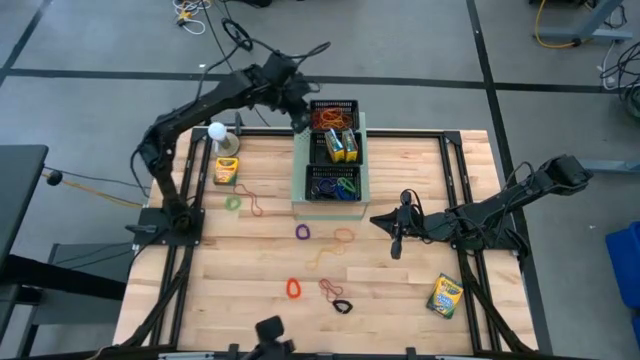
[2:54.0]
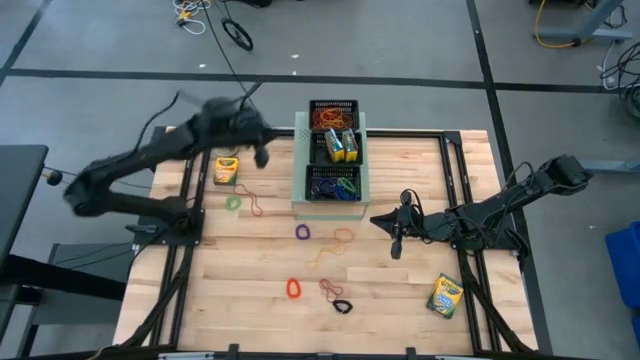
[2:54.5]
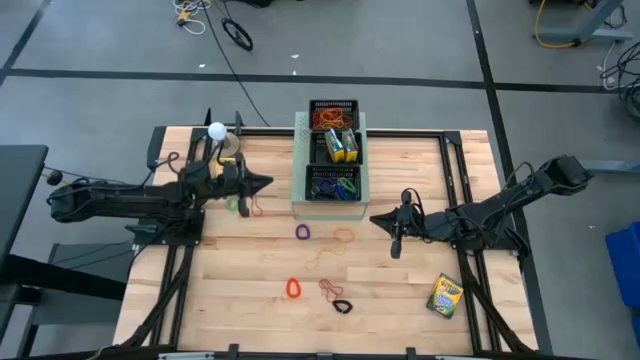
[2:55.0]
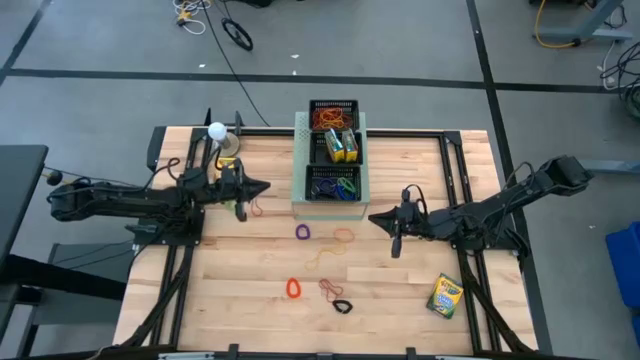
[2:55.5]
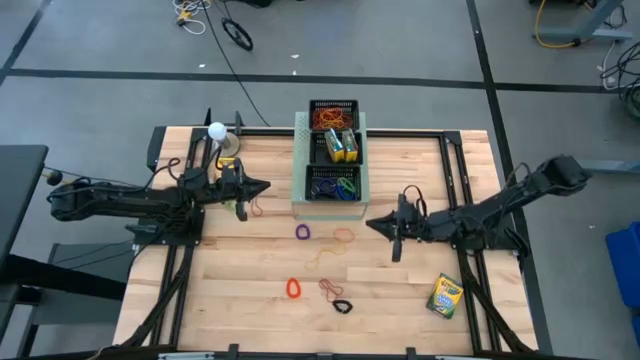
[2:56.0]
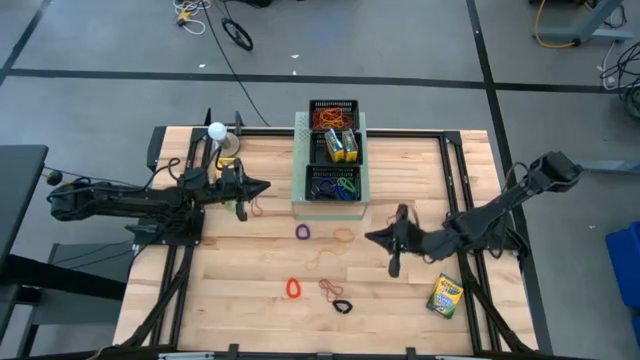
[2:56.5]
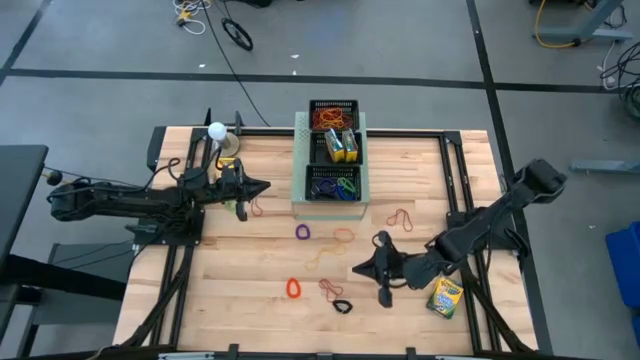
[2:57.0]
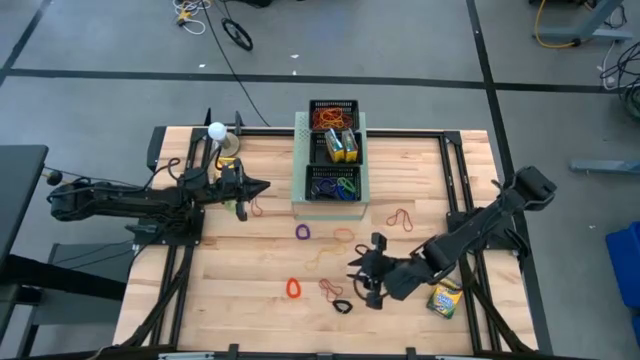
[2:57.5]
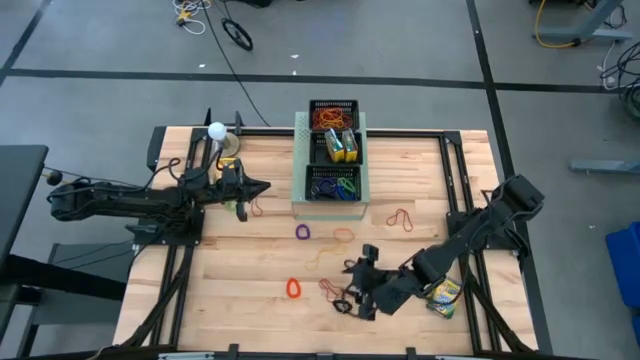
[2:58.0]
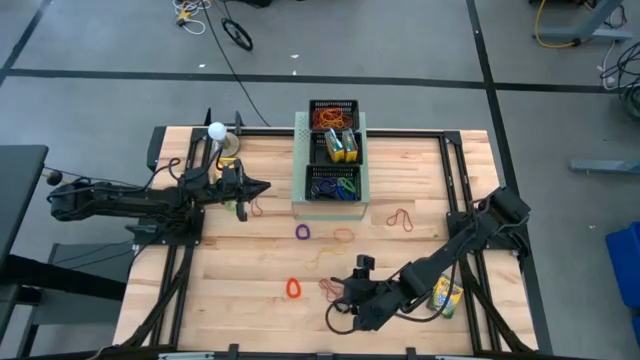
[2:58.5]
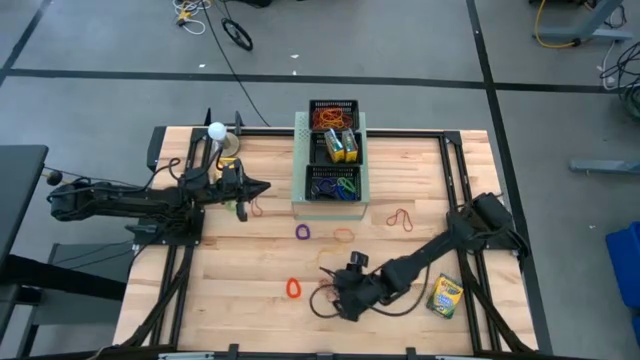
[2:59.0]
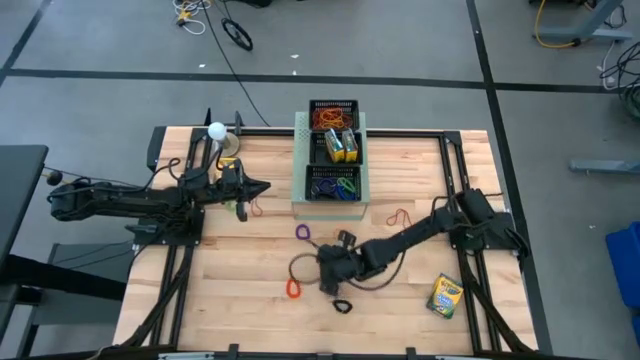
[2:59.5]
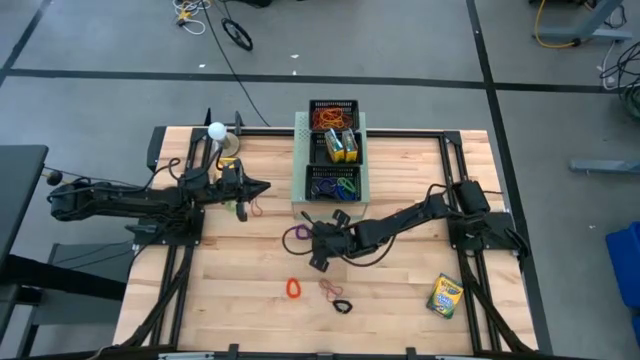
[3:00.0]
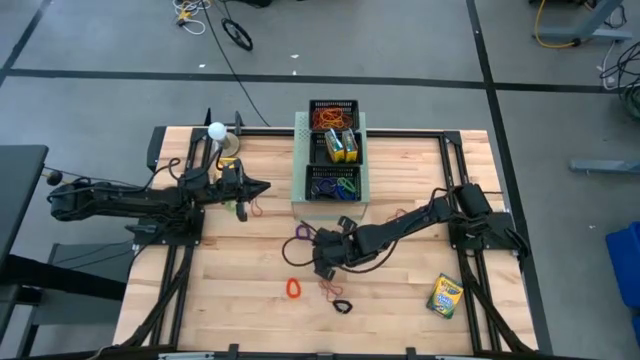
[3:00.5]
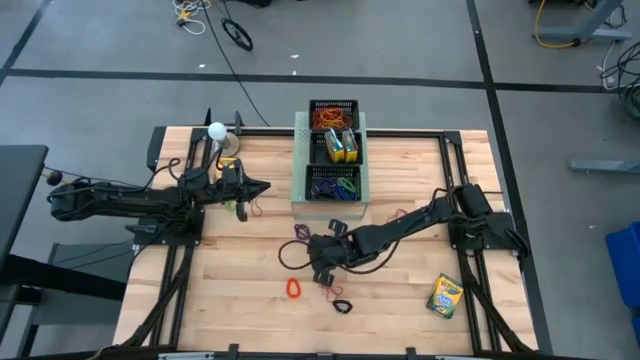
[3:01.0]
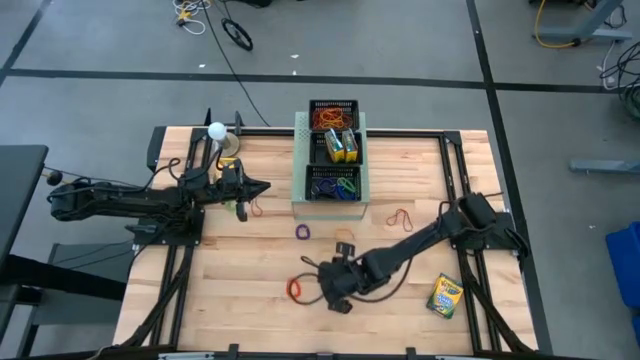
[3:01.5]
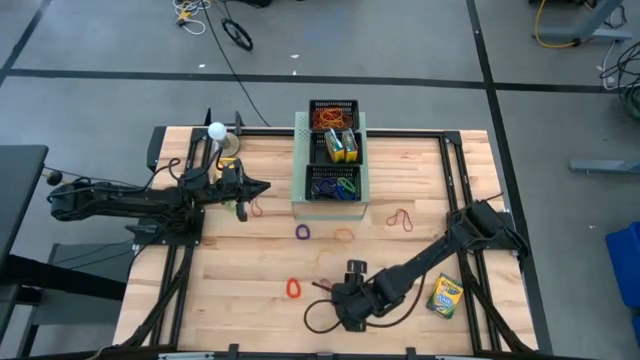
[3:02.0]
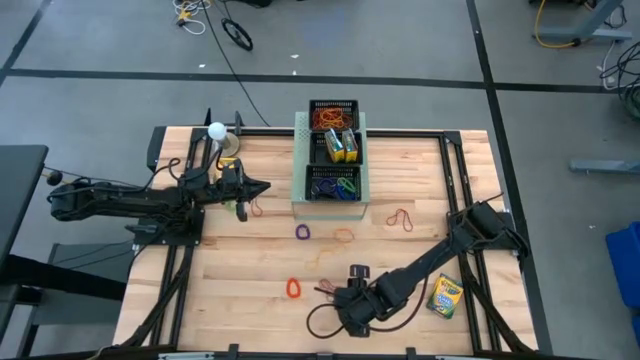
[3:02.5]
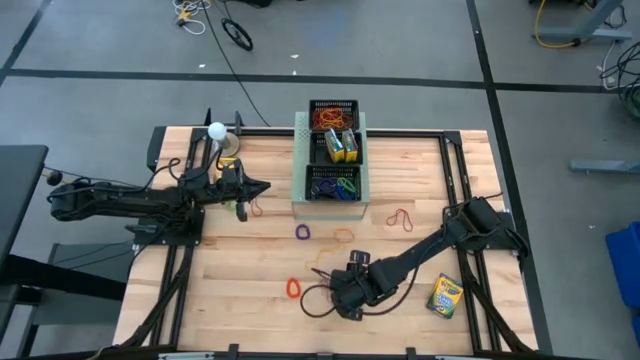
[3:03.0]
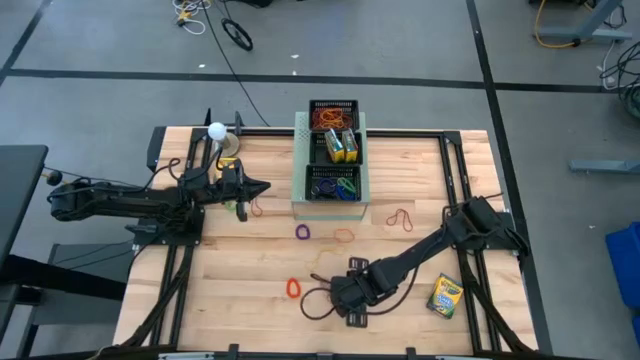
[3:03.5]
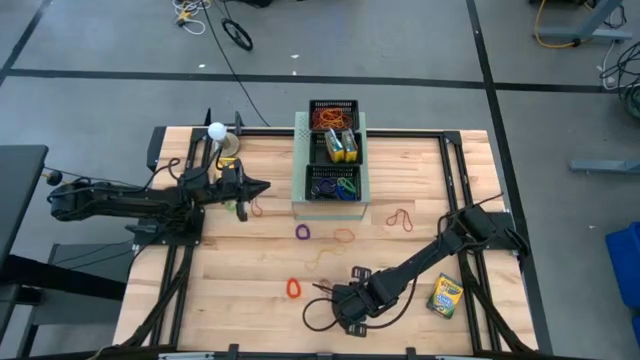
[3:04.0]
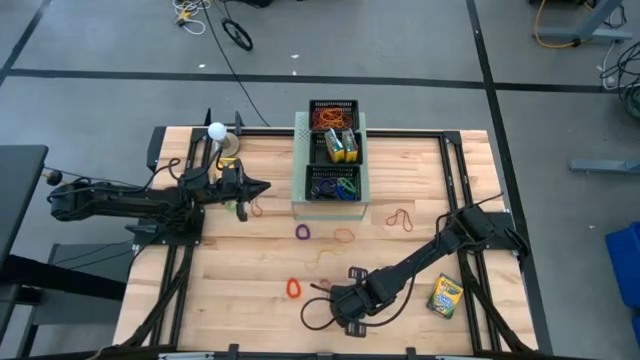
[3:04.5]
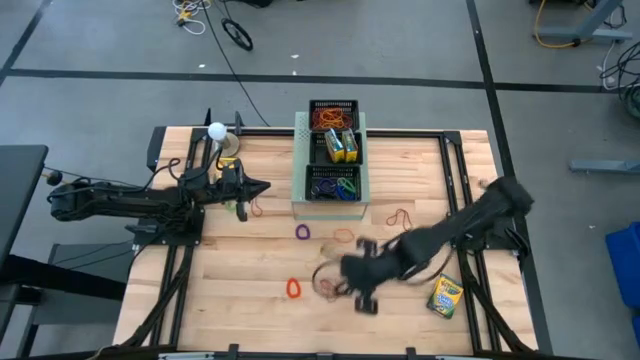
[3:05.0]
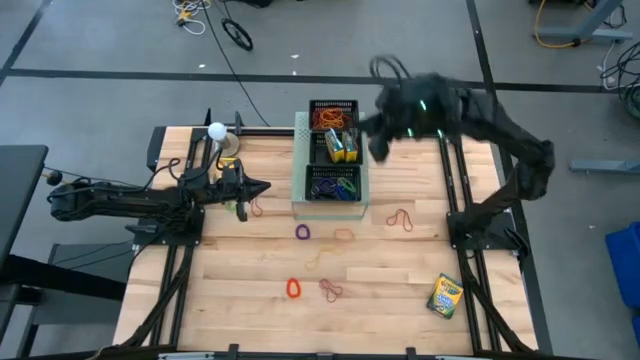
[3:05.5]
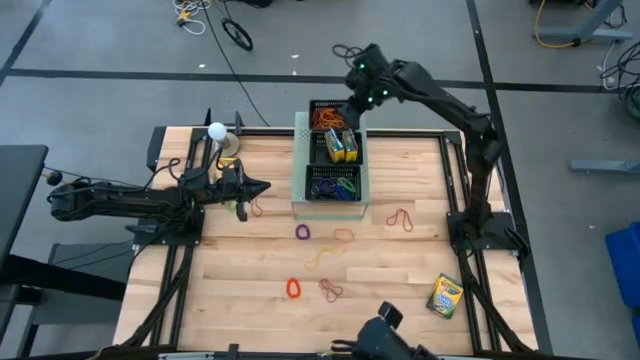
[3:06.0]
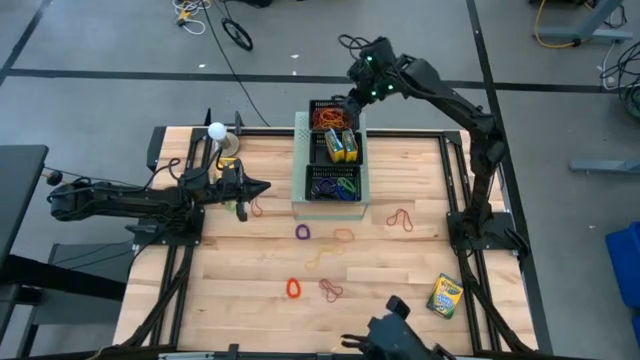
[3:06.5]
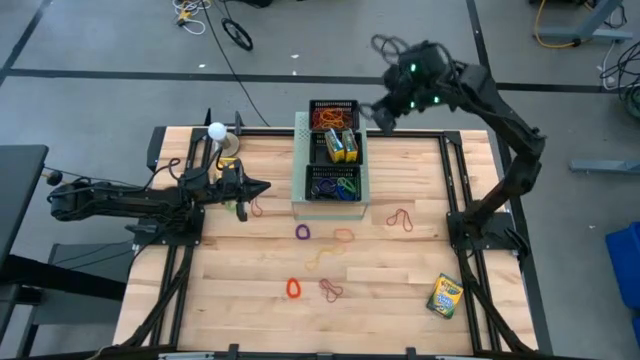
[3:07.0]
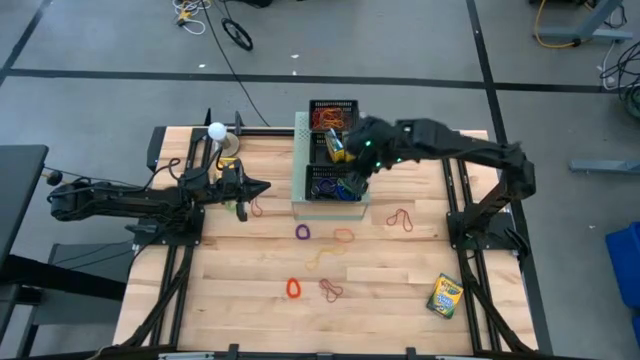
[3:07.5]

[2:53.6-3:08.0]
Task: Pick & Place Office Desk Supplies
Put the black spring keychain into the bottom black bin on the shelf

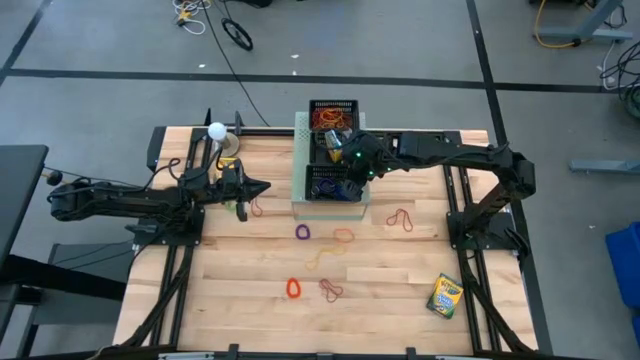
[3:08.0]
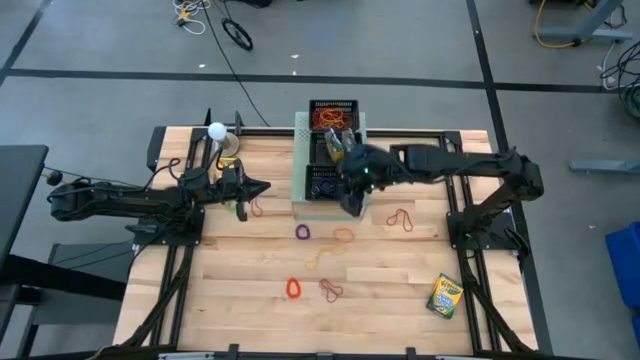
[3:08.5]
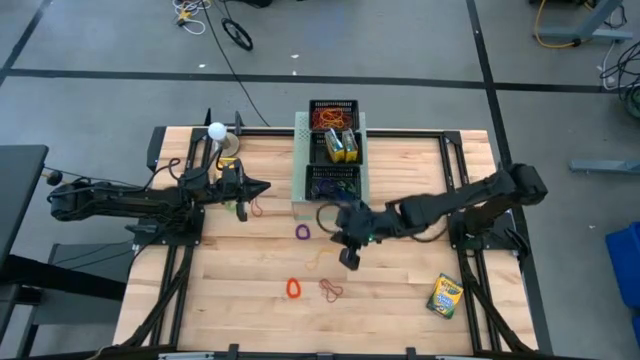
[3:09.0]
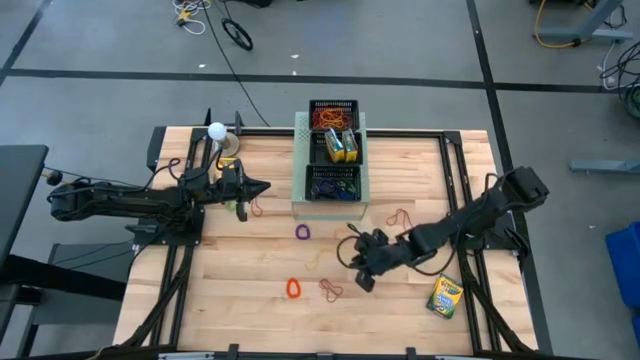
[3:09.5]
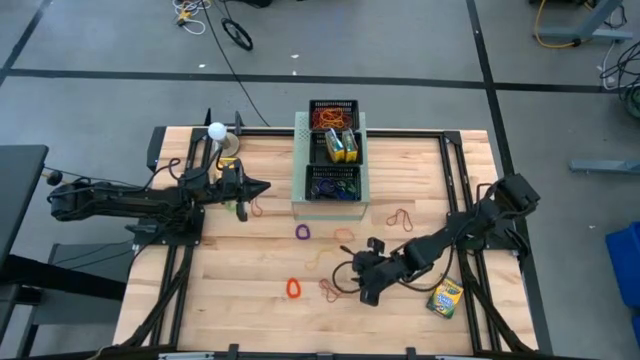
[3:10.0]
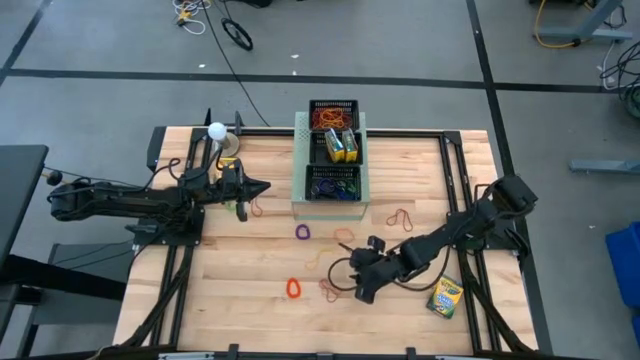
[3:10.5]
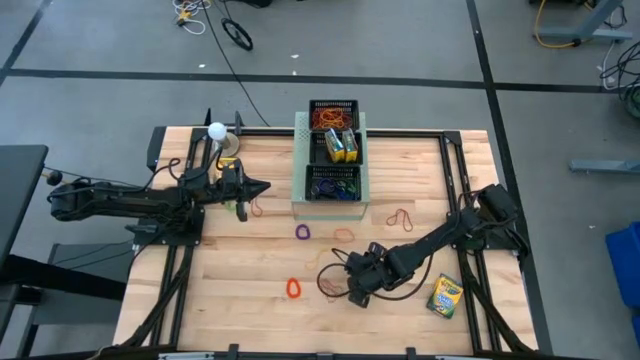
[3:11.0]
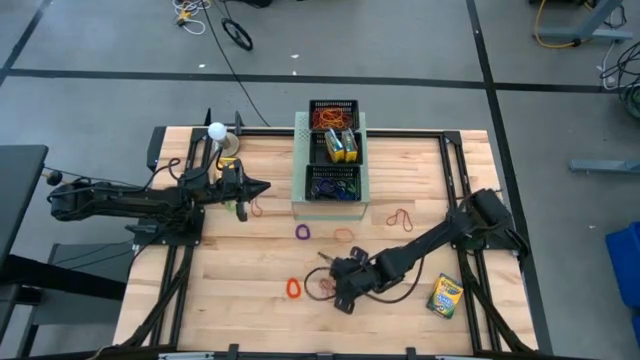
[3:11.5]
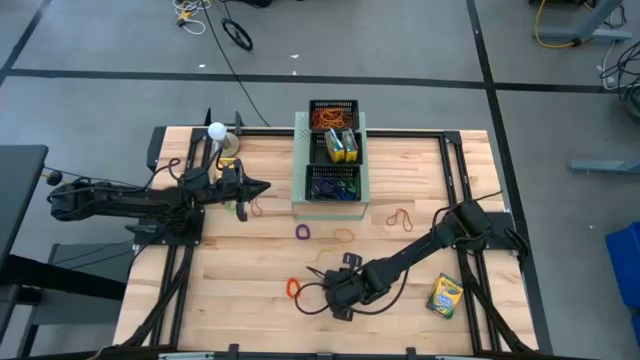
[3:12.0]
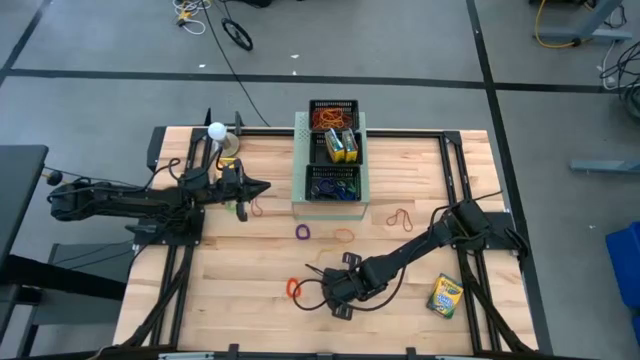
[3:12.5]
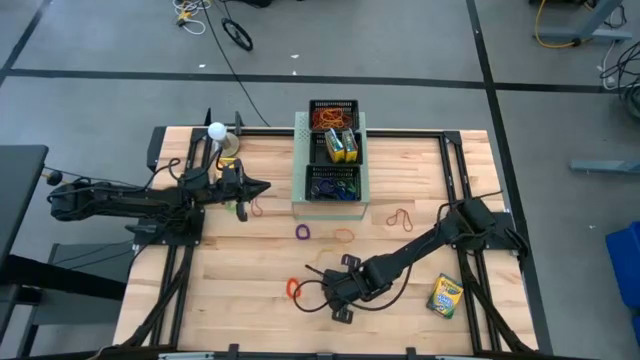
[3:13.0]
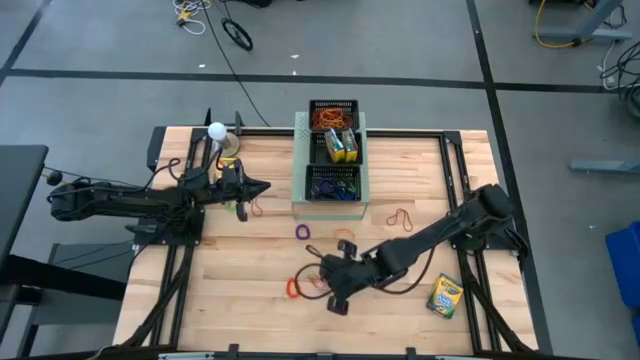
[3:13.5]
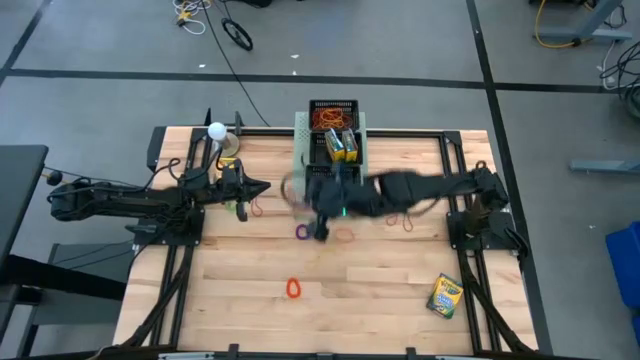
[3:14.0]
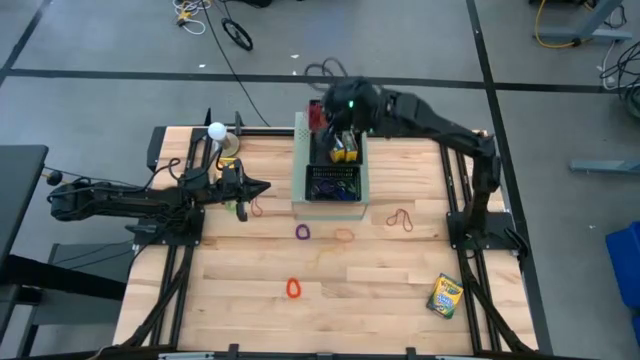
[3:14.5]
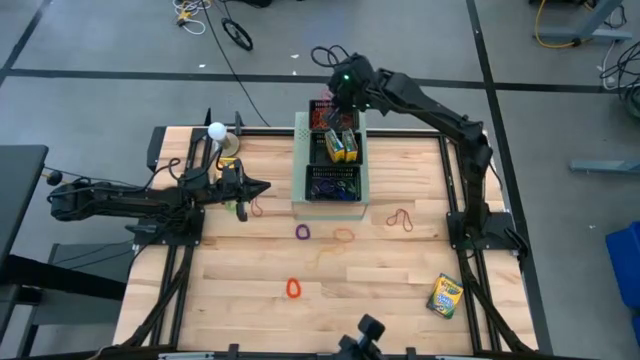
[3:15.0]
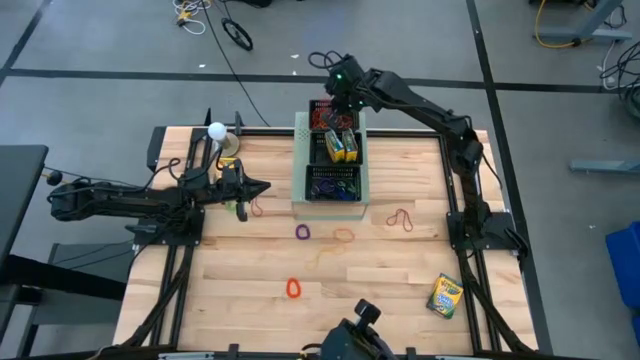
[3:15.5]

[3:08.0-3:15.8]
Put the red rubber band into the top black bin on the shelf
